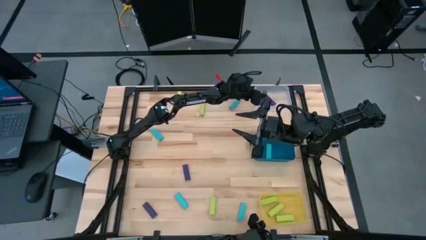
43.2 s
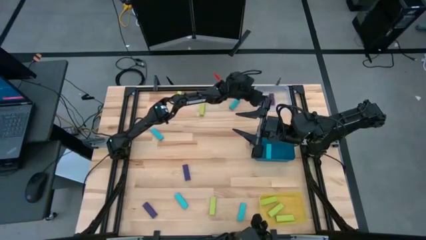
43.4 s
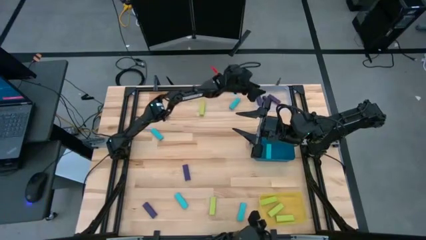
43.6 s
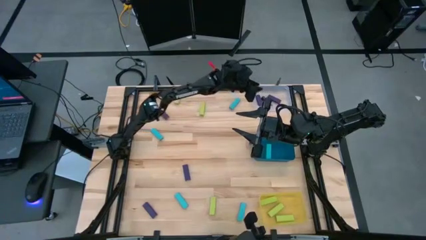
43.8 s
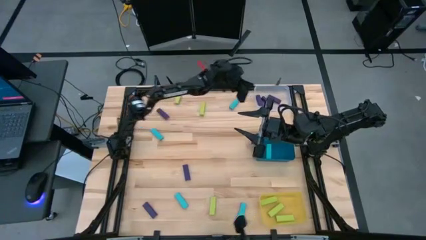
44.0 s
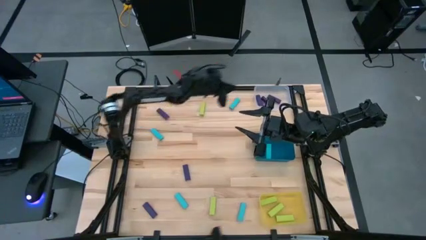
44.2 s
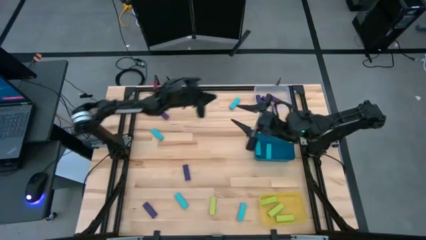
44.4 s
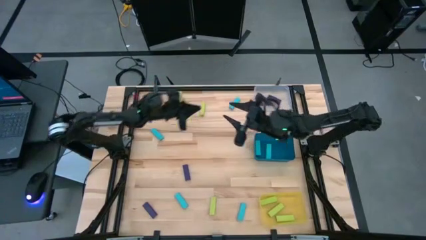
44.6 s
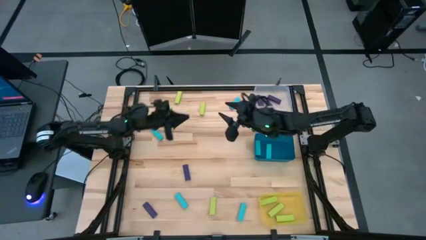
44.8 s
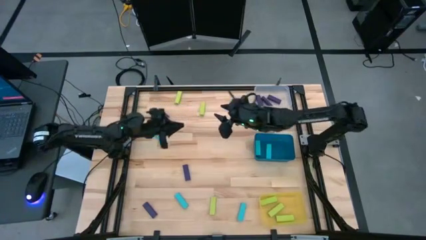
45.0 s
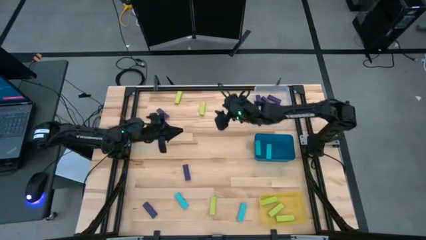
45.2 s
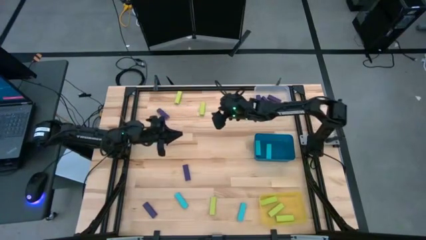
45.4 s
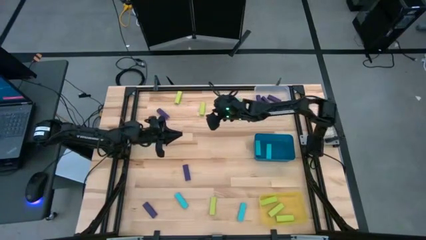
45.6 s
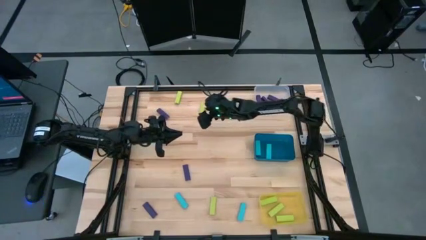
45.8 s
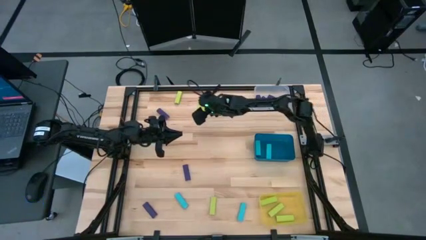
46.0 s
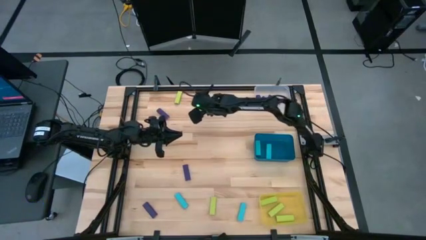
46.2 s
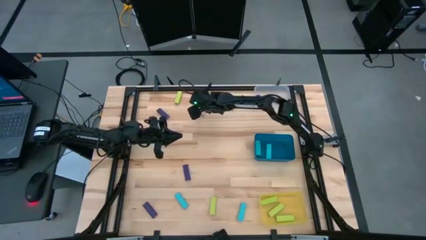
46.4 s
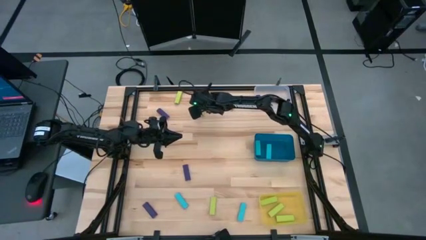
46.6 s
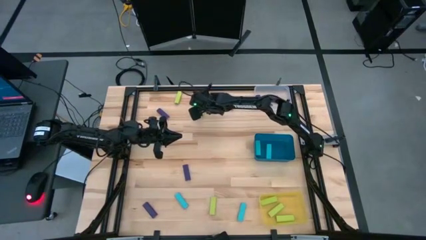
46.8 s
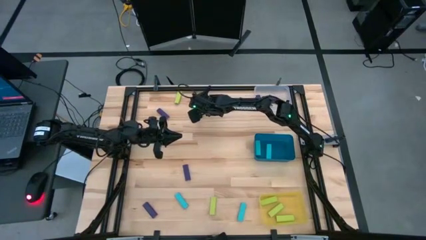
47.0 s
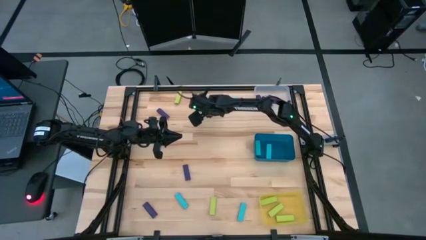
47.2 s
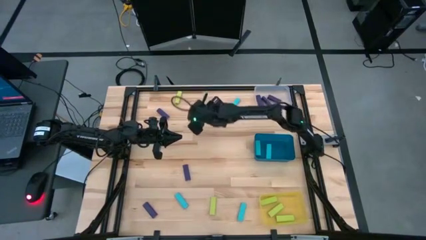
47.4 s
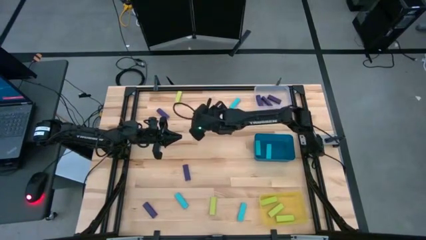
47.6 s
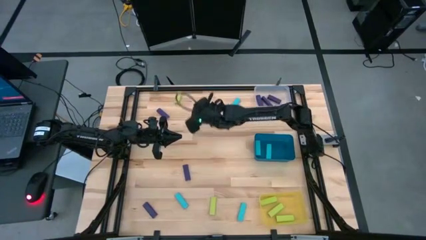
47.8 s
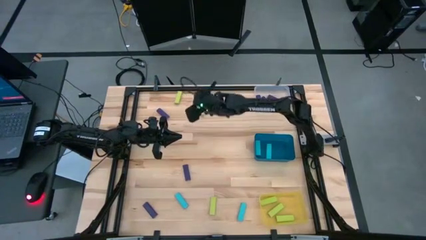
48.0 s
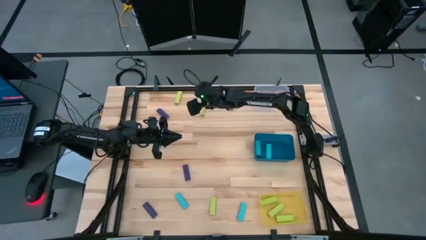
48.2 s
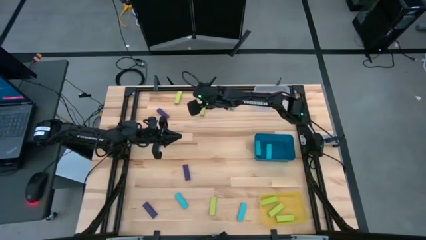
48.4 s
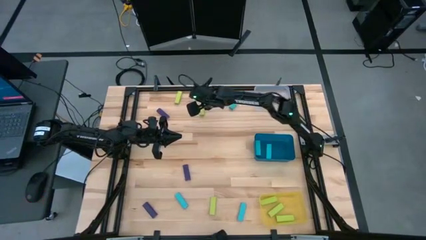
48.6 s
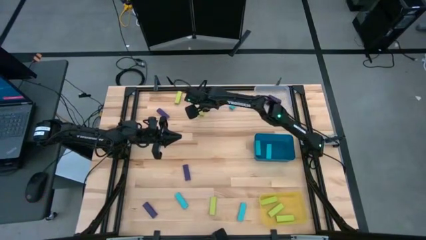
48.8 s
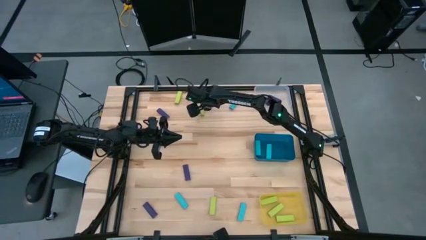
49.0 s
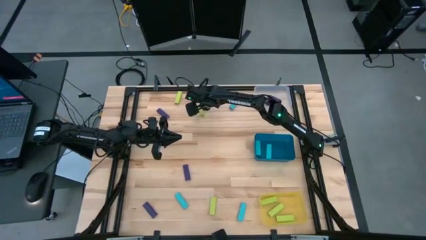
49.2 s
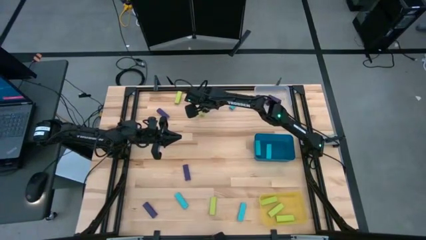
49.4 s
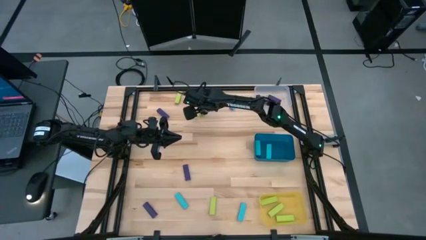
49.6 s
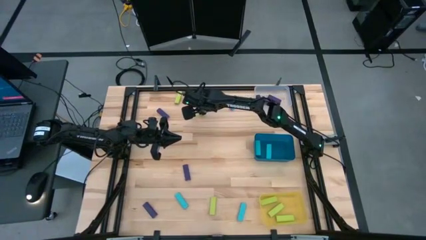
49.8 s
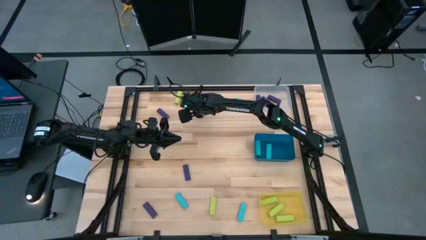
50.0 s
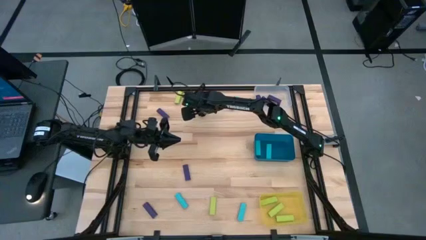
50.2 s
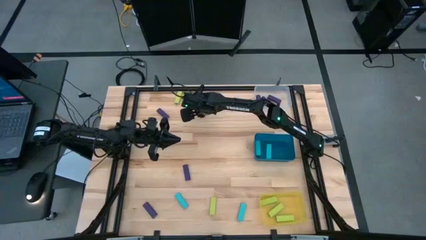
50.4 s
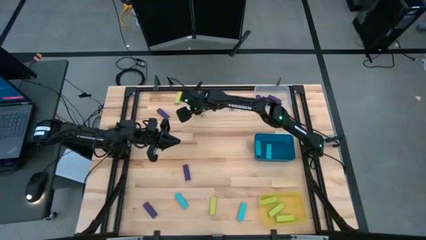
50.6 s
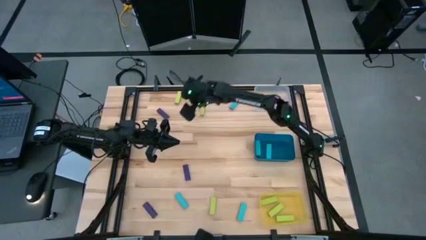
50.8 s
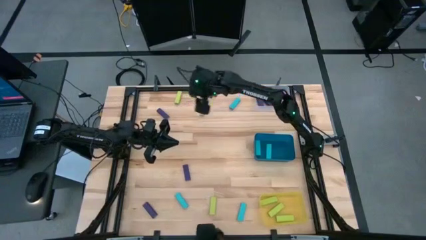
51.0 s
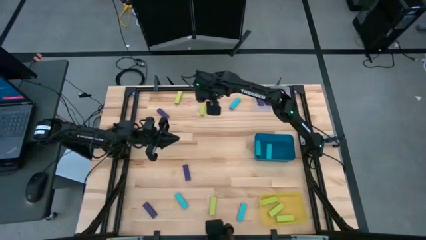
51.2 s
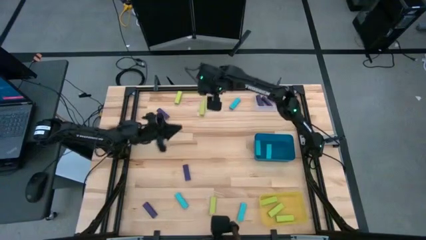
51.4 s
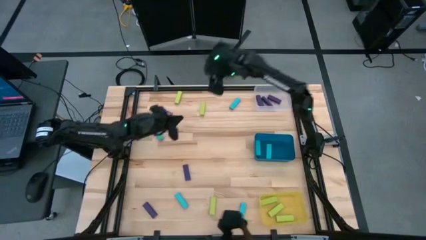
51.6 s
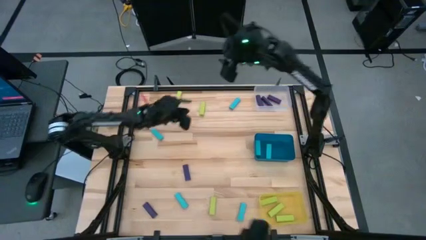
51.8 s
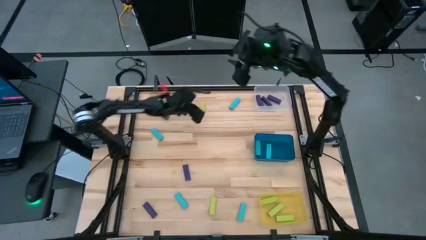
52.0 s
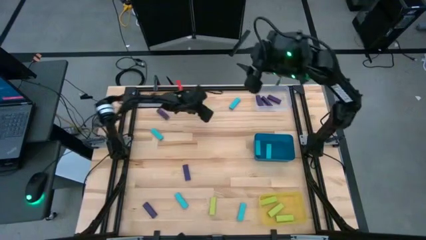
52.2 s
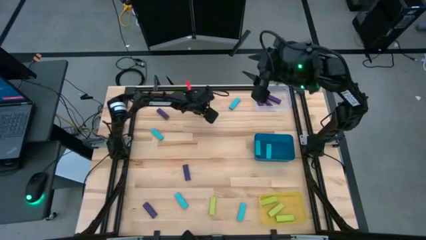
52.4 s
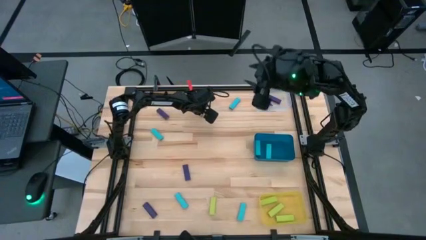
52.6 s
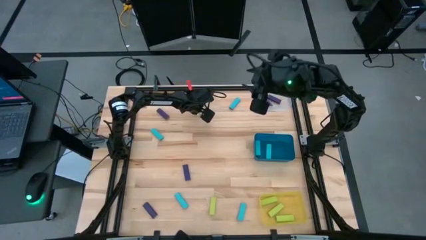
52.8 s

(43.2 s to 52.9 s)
Task: Sort blocks
Put the light blue block into the blue bin

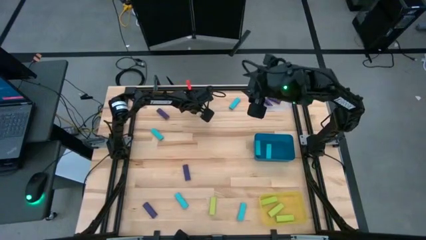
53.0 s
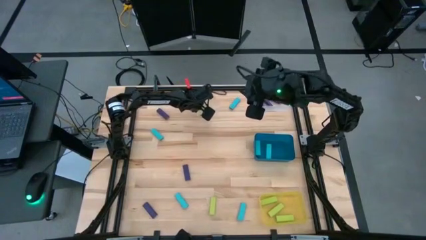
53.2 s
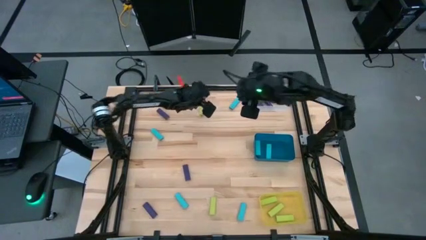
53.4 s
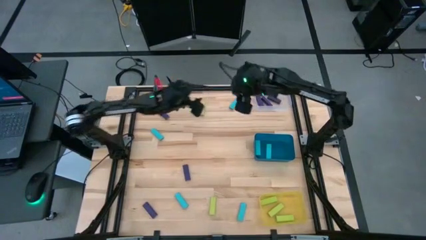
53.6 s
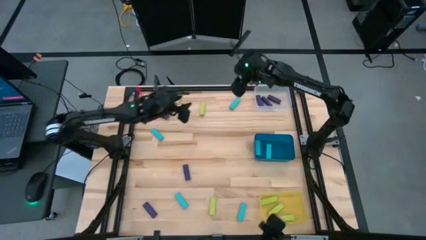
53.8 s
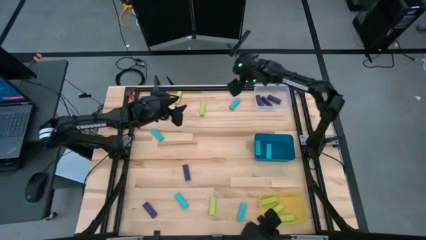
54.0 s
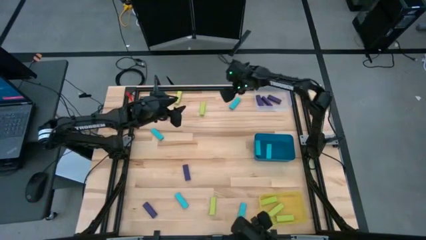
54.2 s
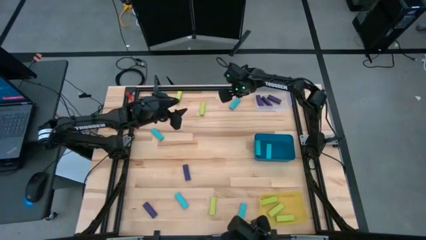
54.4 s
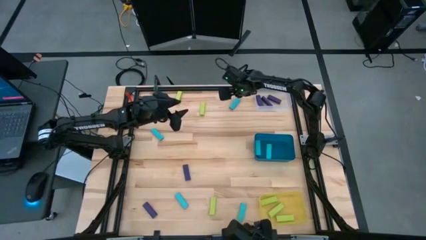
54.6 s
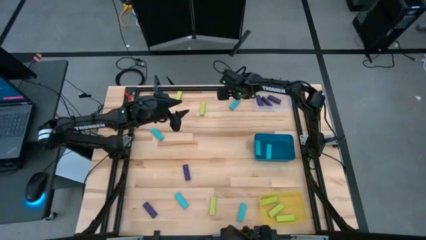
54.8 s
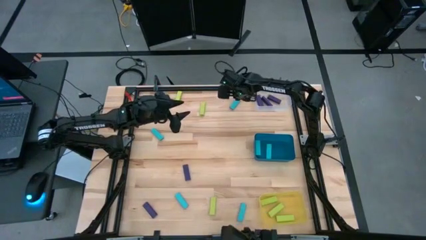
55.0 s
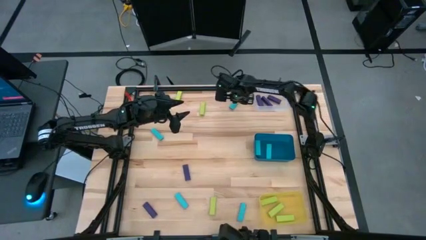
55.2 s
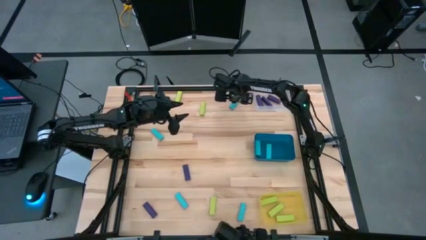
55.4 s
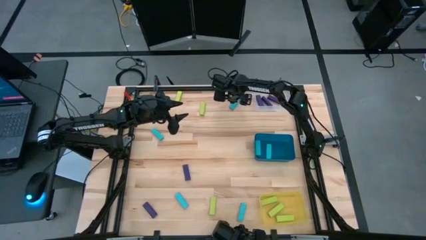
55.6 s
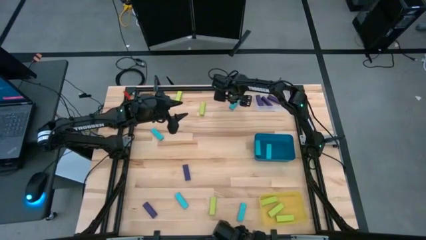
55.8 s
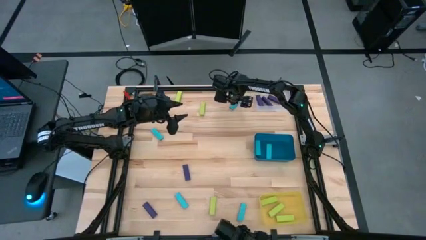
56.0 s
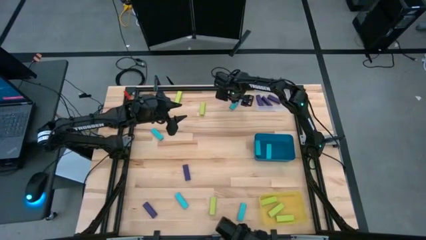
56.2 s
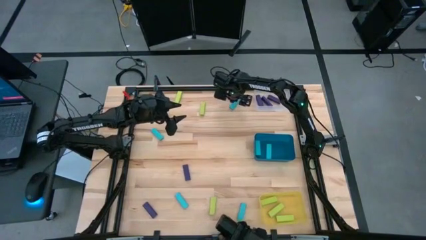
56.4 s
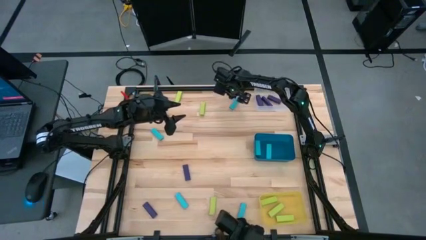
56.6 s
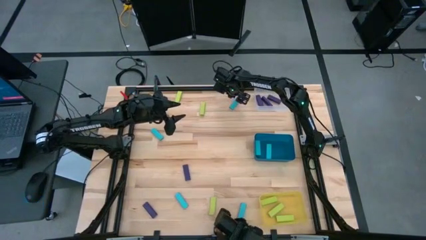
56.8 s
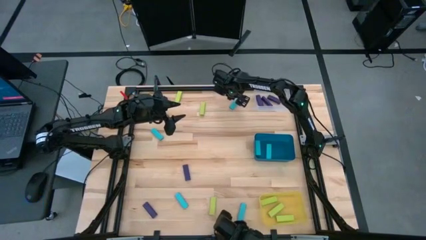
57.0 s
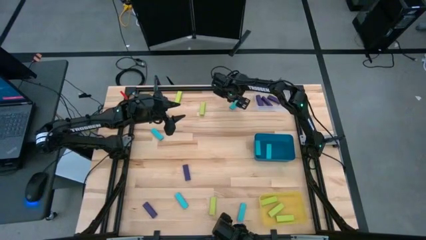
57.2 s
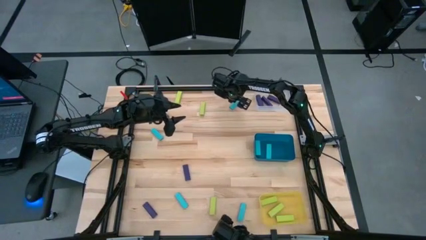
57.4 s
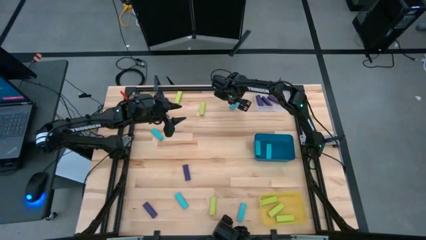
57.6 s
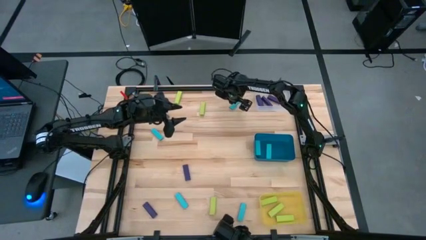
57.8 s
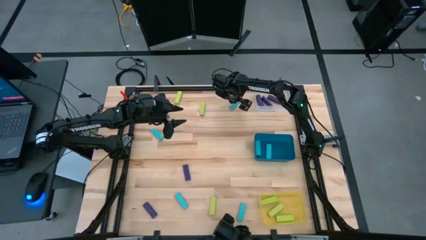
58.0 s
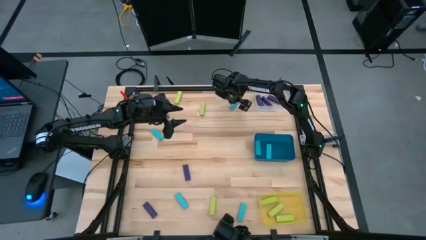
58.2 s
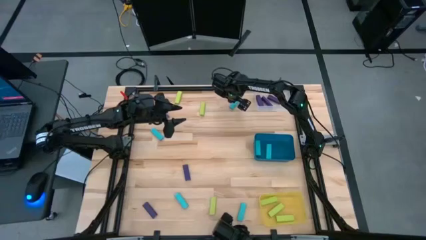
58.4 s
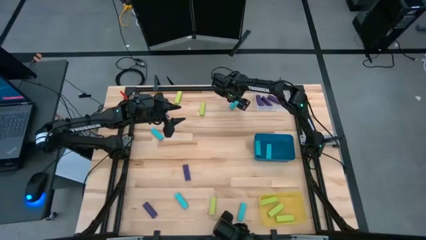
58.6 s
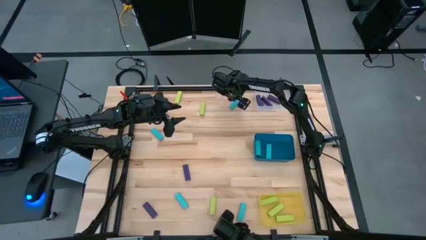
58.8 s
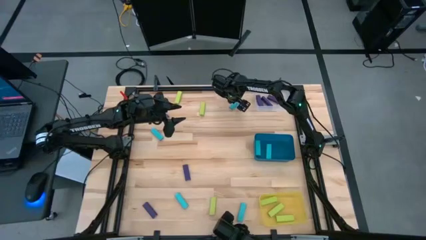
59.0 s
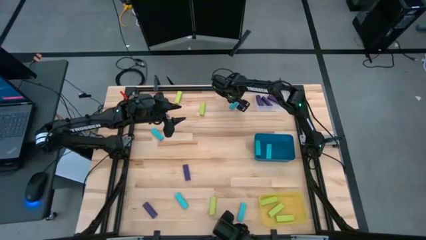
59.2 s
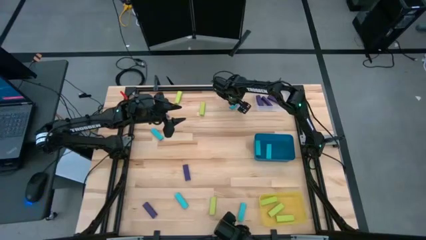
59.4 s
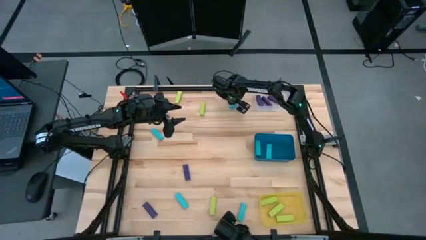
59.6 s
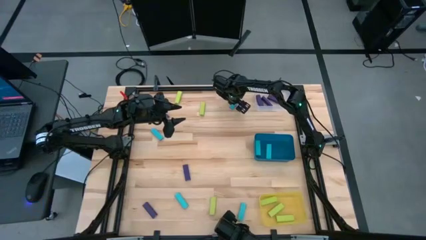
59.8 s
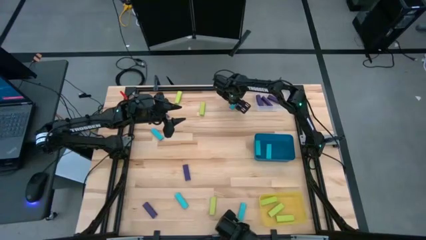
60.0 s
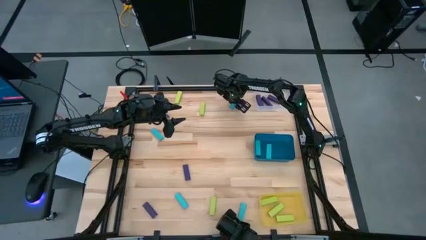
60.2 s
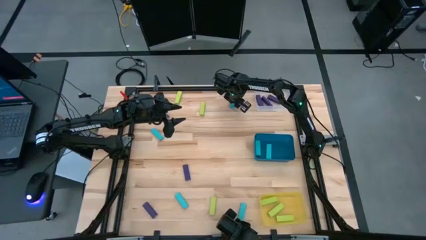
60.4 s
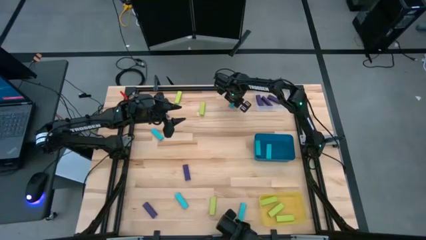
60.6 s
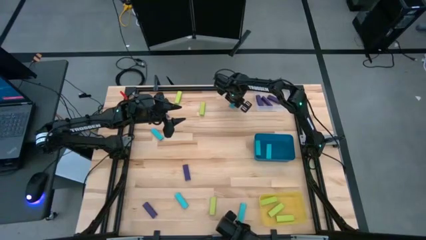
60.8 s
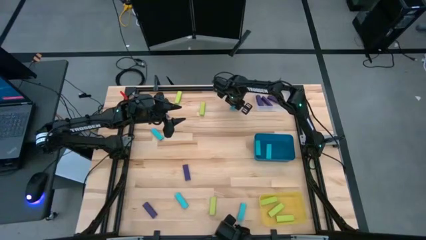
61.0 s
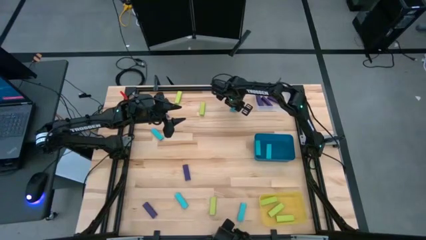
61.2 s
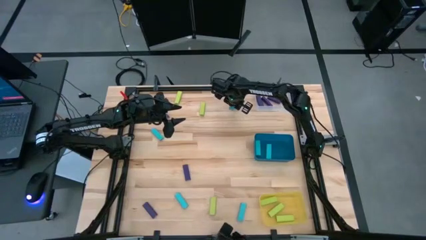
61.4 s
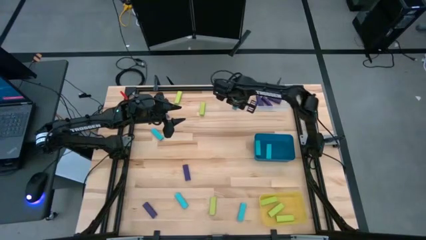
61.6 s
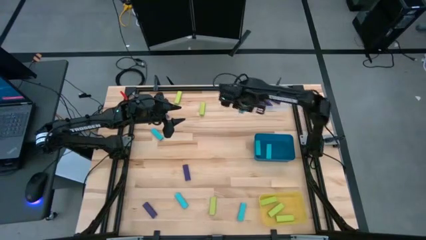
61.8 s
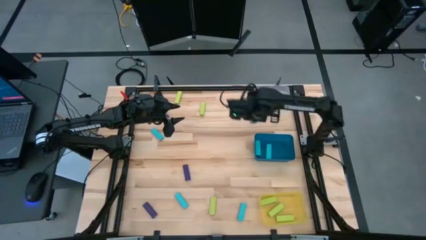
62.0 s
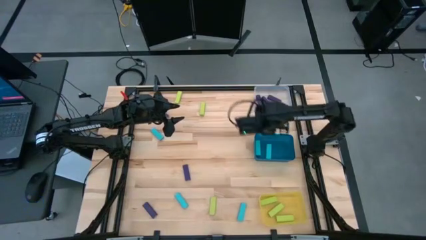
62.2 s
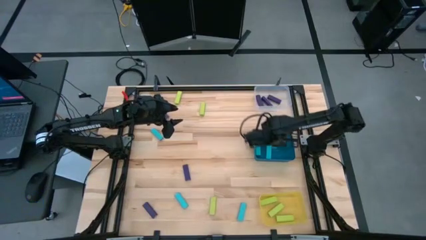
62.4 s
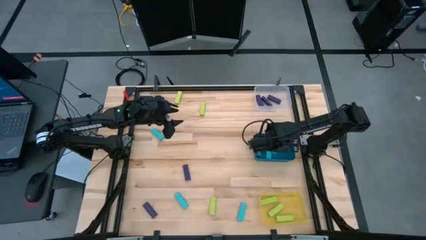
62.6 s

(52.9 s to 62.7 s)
Put the light blue block into the blue bin
